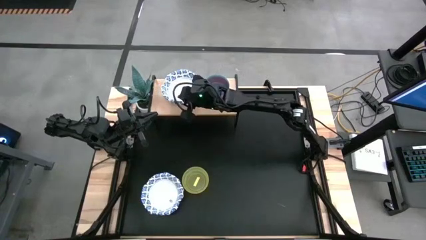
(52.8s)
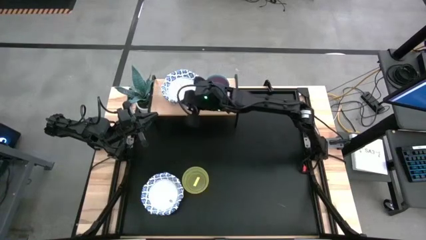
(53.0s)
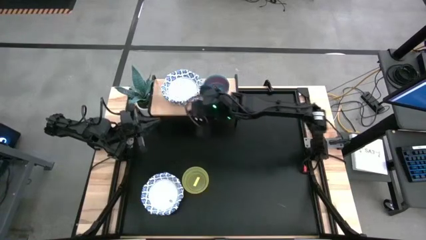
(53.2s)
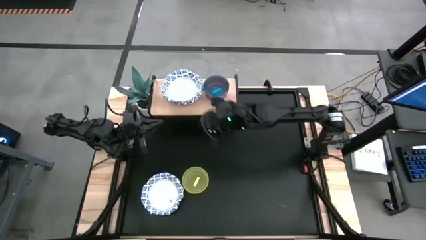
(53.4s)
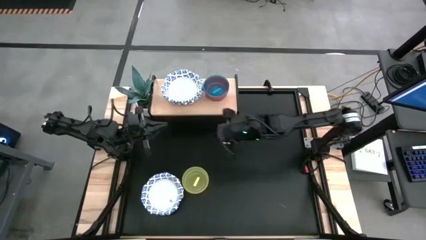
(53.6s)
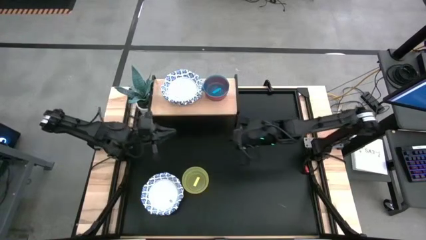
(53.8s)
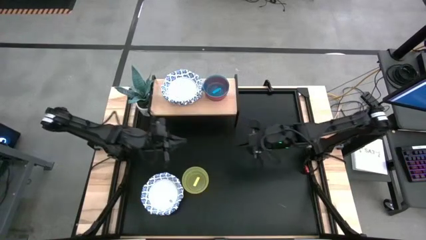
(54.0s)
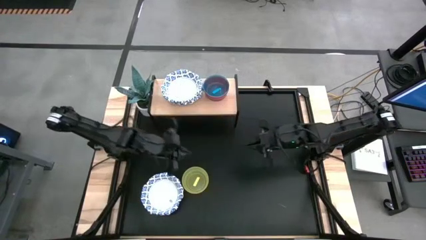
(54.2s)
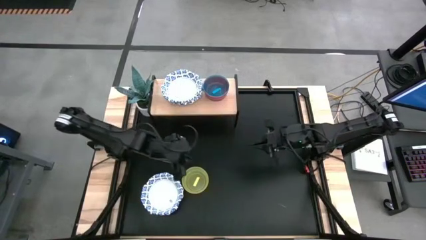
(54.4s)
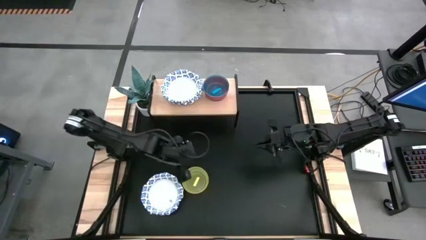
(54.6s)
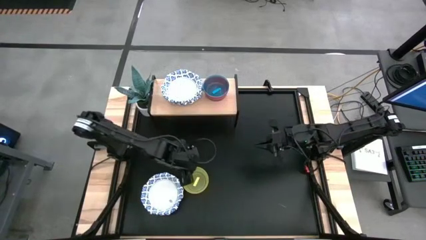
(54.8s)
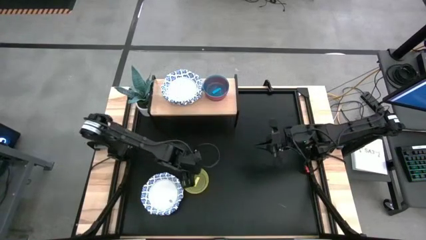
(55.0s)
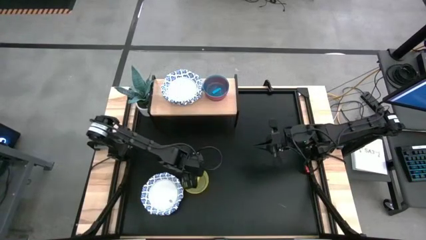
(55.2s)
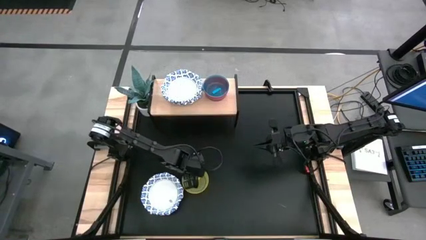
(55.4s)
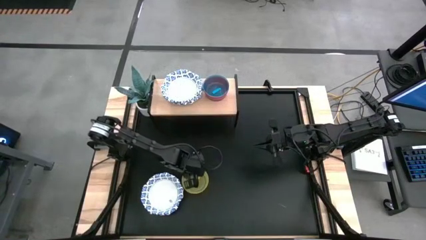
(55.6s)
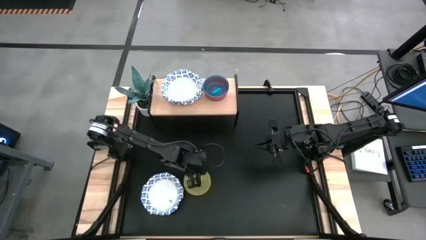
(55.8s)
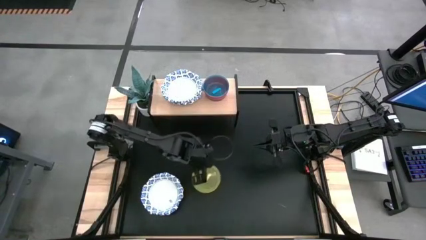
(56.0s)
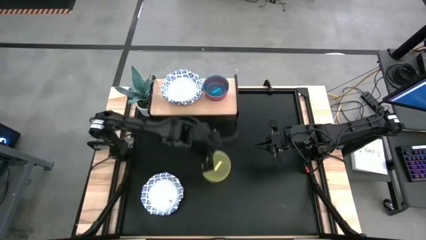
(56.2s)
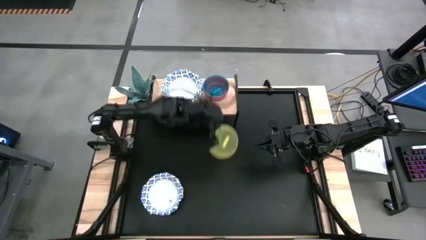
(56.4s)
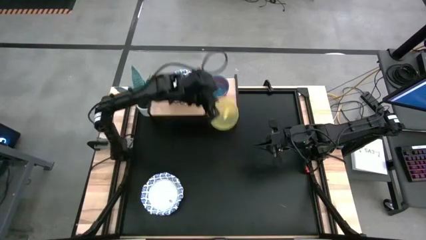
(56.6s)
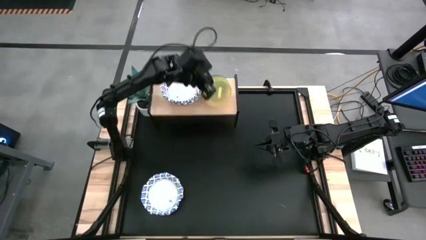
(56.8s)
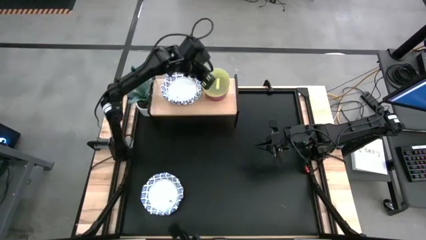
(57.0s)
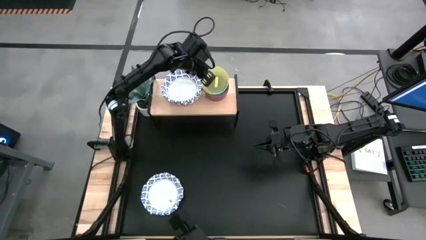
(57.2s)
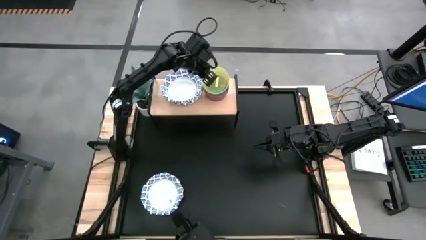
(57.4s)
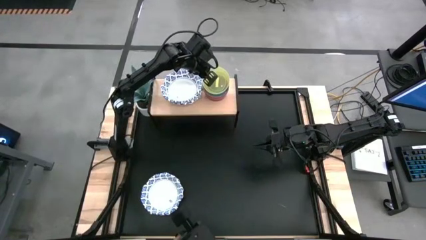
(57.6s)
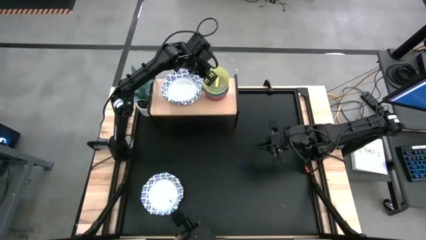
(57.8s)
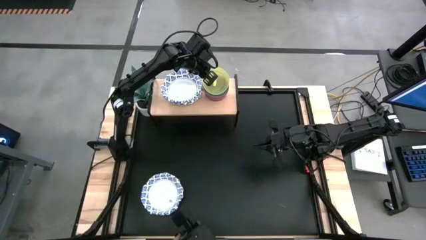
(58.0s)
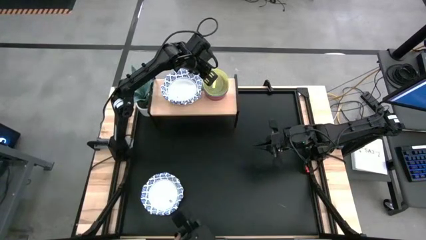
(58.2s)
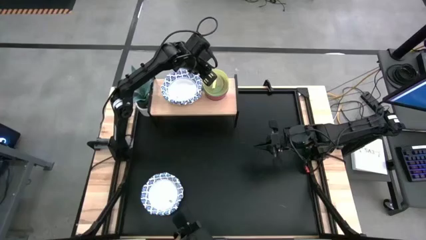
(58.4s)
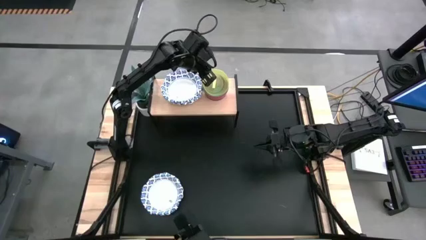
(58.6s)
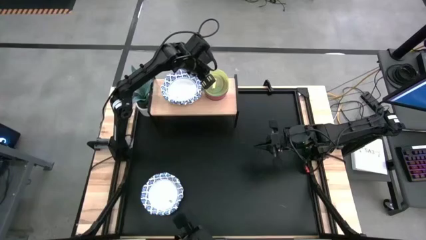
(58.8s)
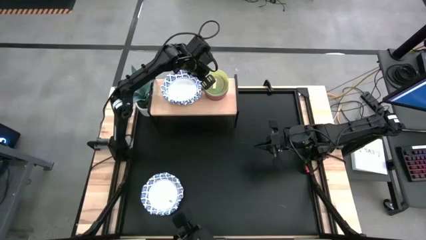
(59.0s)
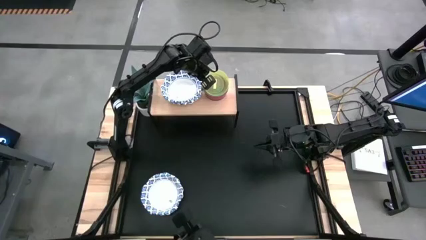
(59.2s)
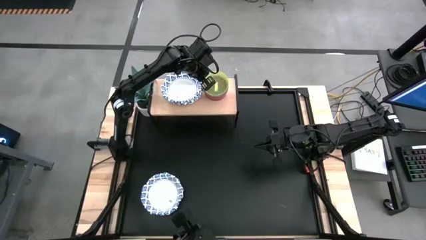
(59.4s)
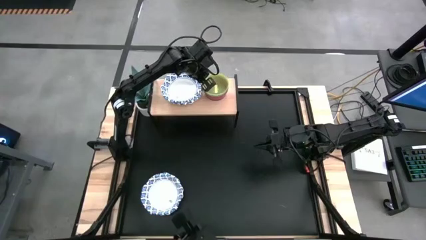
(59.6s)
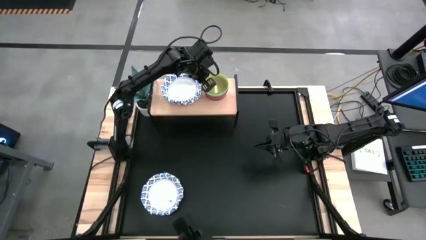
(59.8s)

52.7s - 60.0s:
Task: Place and stack bowls onto a shelf
Stack the yellow bowl on top of the blue bowl on the shelf

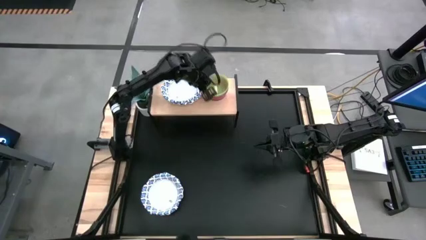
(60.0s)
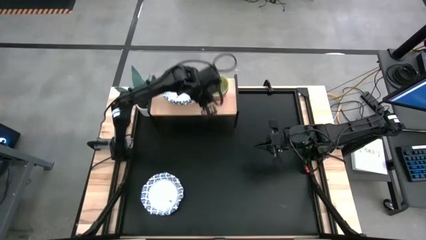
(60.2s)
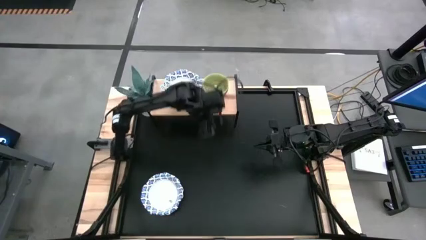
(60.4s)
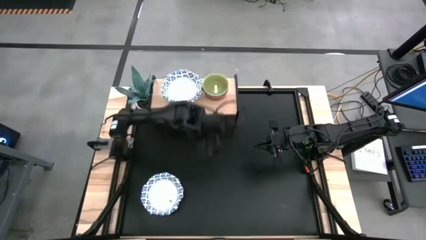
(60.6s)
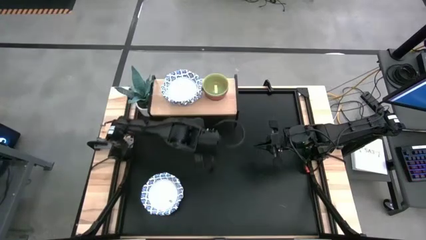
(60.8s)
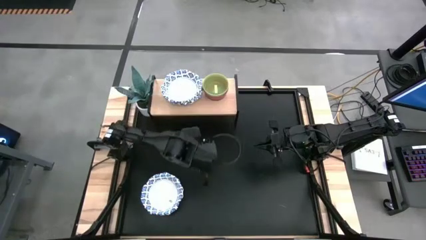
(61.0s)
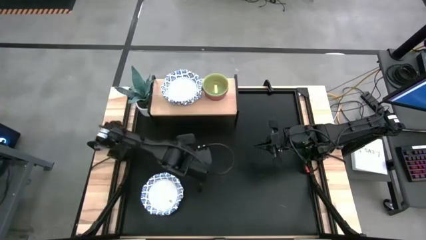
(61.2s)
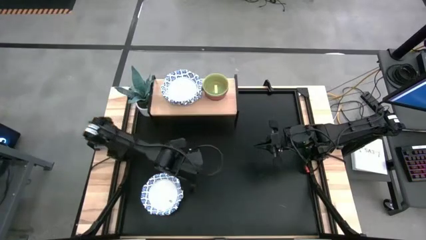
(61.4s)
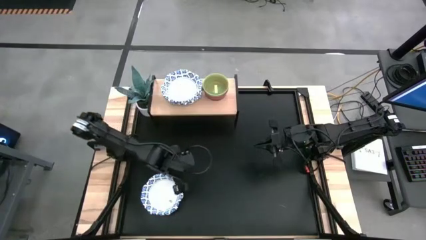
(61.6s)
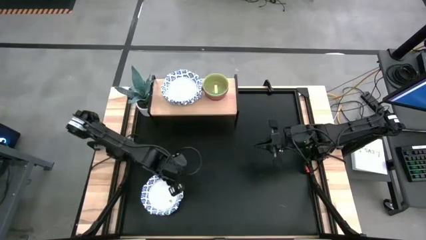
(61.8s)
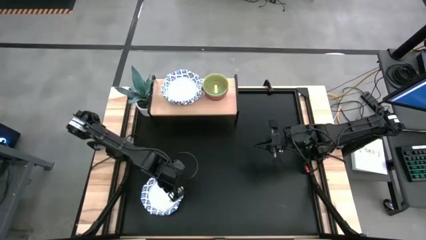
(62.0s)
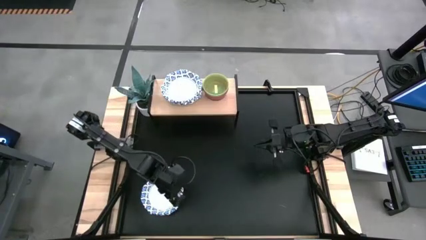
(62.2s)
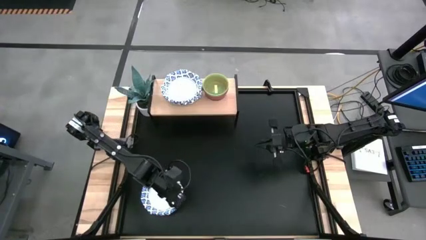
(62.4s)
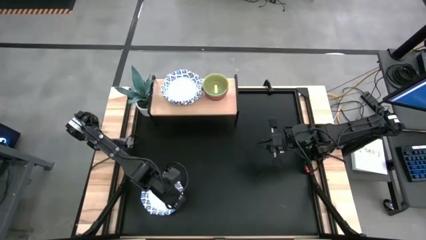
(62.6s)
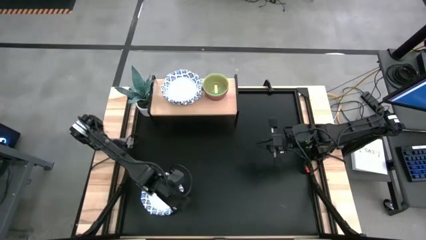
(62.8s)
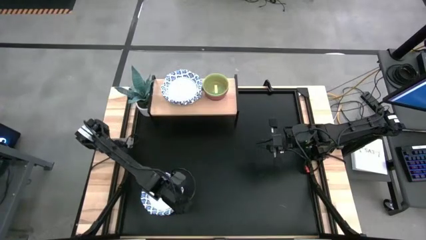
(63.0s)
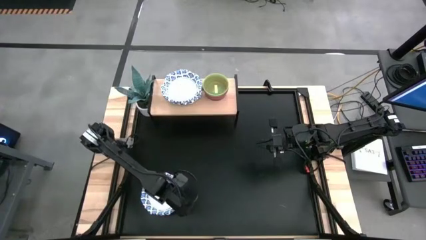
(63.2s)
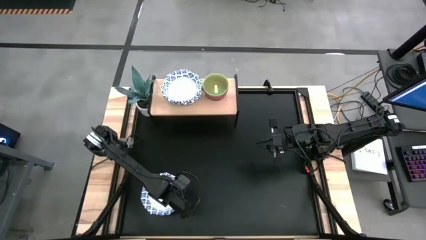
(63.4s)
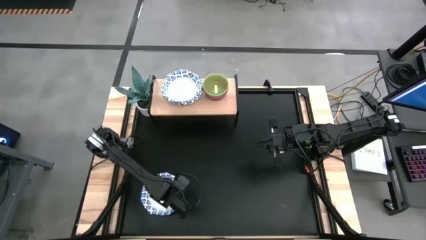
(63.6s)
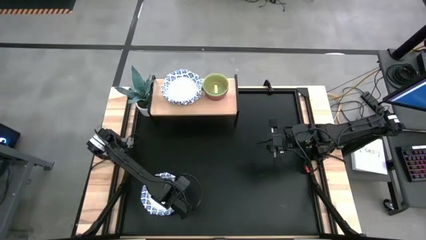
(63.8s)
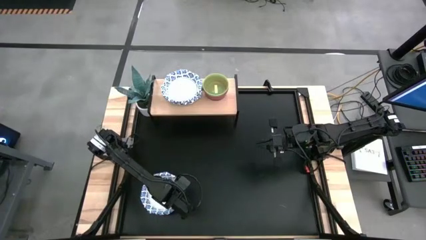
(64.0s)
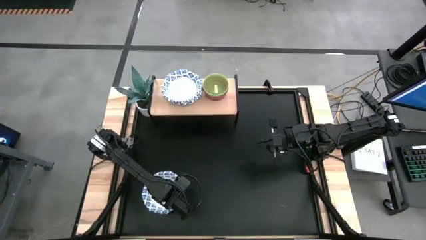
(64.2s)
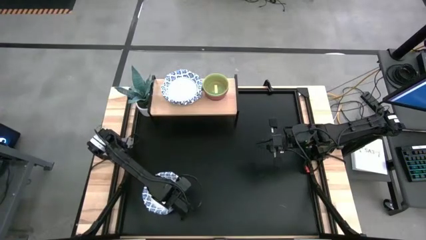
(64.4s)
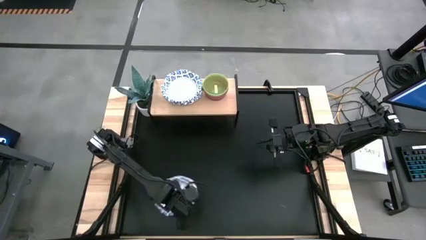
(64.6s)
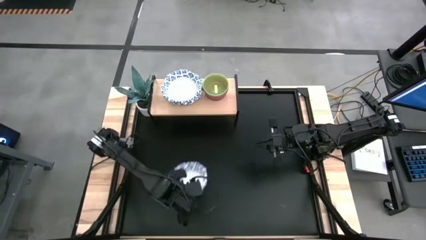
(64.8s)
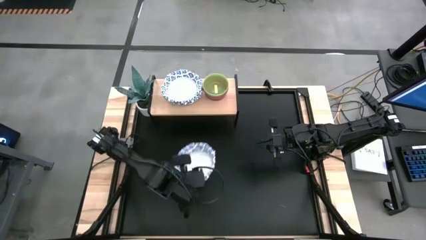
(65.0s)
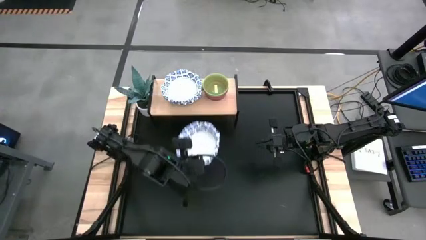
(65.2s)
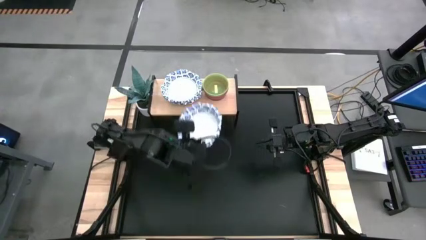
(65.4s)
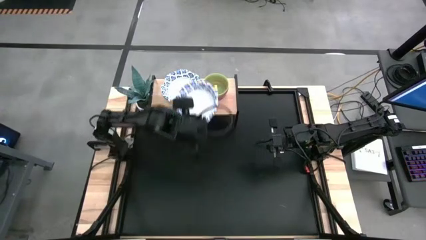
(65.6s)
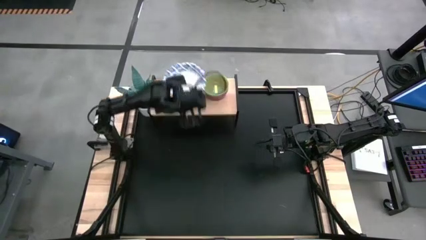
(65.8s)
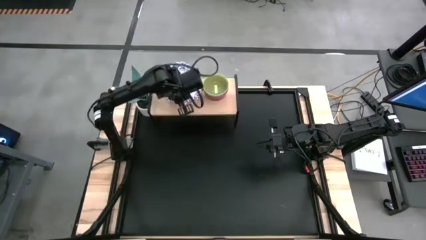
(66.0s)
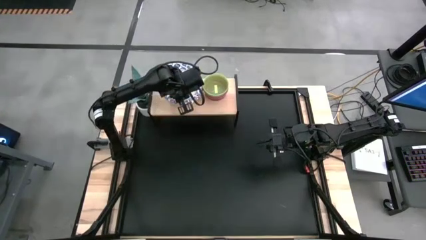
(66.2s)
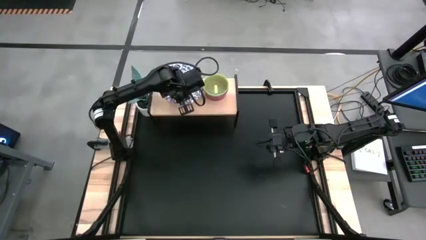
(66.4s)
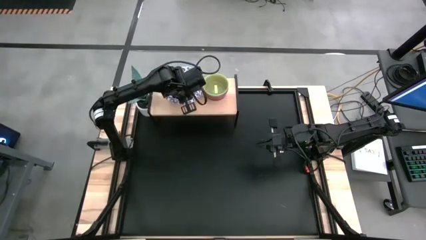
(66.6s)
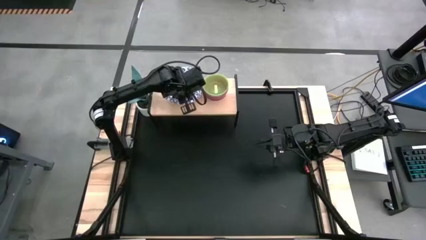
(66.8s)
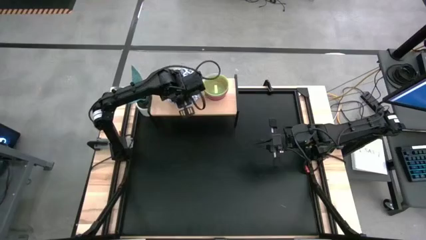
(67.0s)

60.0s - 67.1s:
Stack the white patterned bowl on top of the white patterned bowl on the shelf

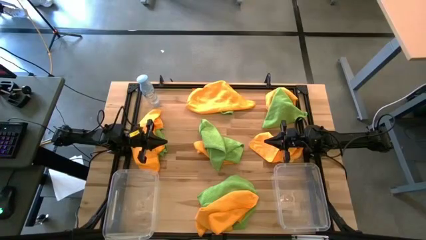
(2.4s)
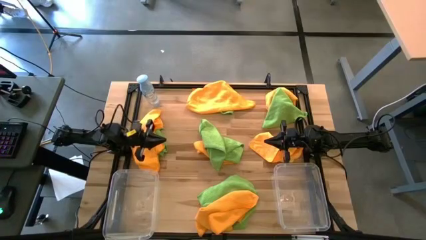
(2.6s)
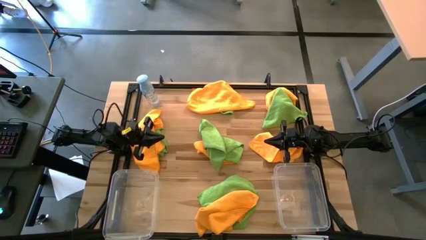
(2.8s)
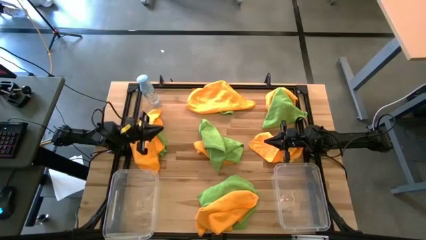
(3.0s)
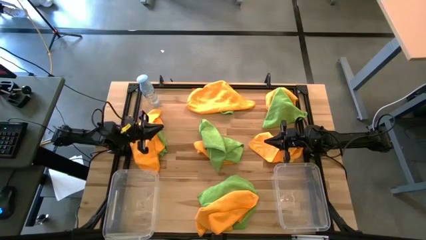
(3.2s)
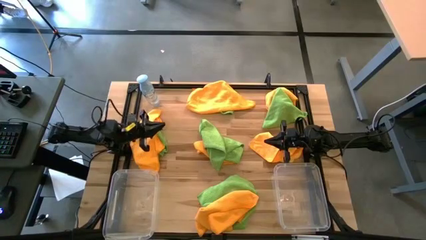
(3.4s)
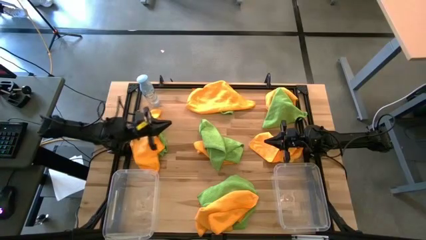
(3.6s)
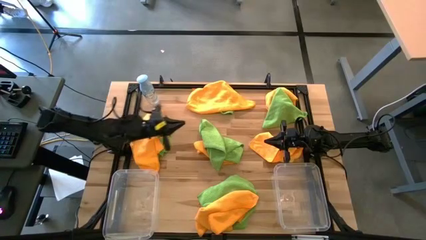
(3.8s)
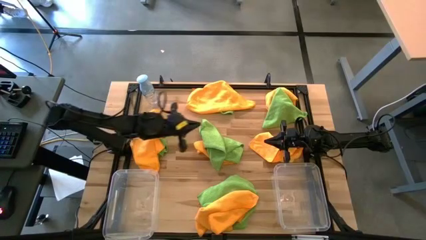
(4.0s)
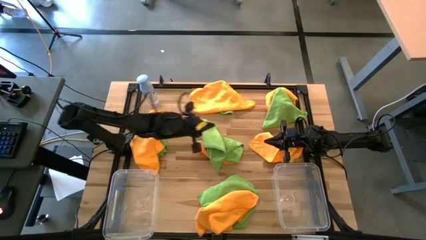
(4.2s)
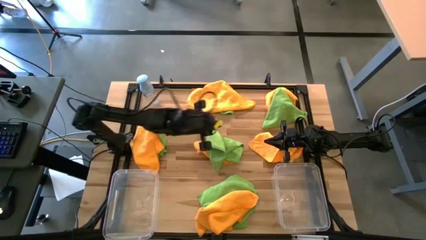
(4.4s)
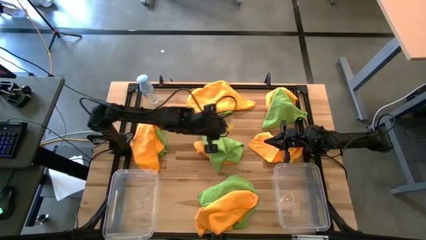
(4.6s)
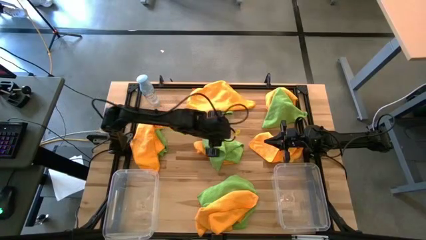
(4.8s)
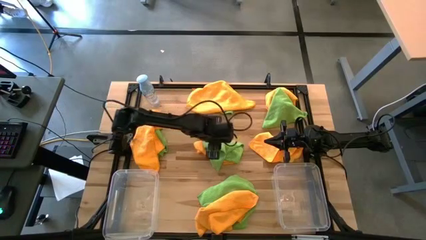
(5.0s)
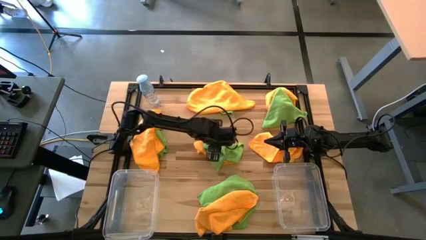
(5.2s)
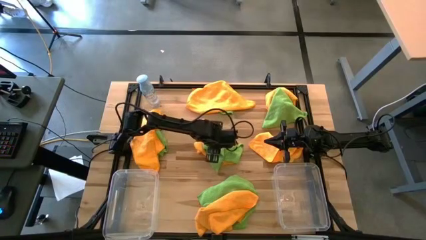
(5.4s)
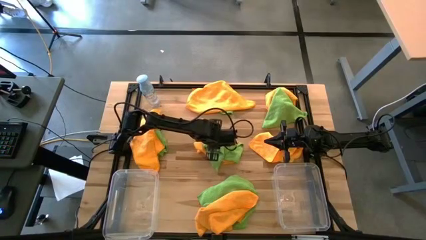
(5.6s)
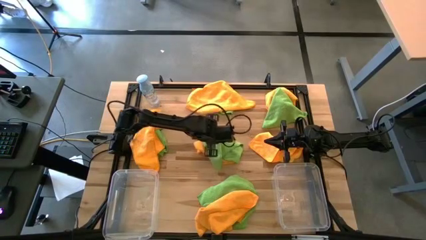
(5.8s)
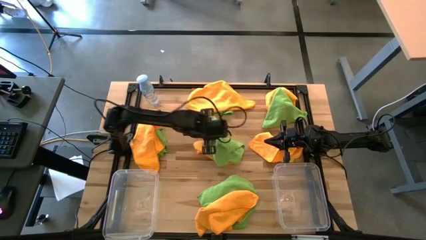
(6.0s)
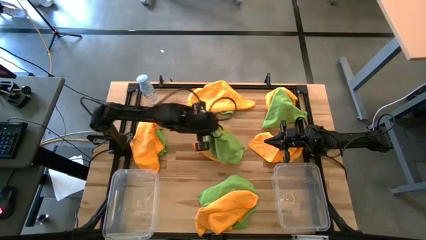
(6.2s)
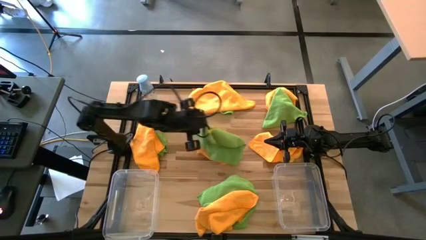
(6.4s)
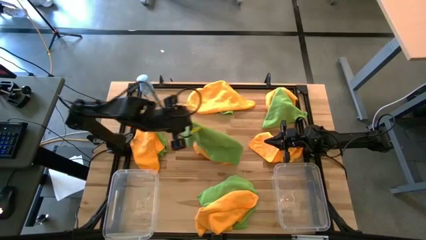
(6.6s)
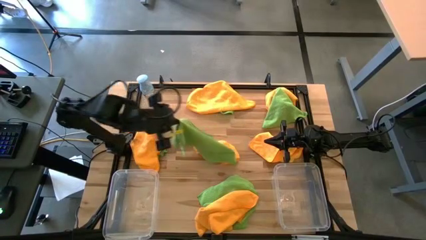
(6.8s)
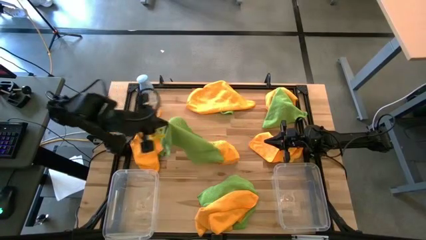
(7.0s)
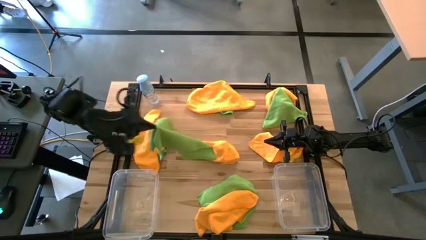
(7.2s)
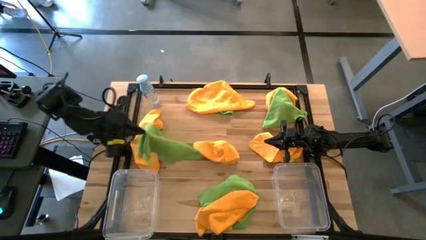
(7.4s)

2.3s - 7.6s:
Task: Sort microfiber towel by color & place in baskets
Put the green towel into the left transparent bin
